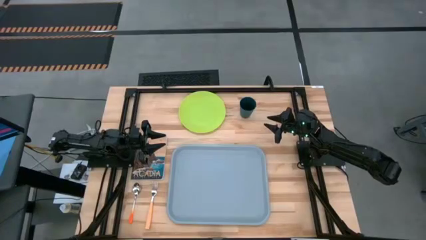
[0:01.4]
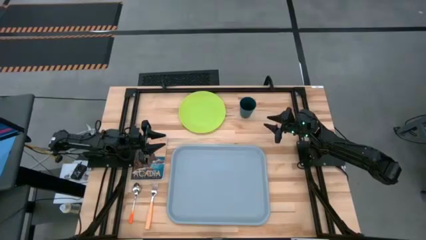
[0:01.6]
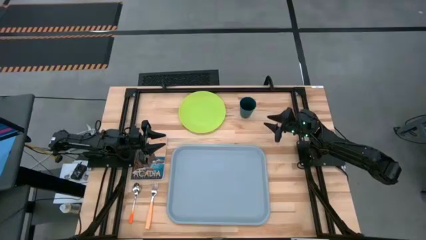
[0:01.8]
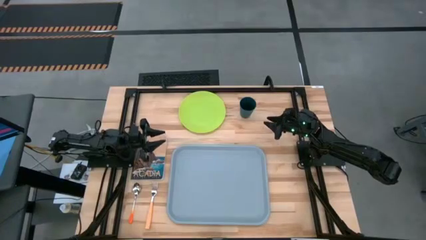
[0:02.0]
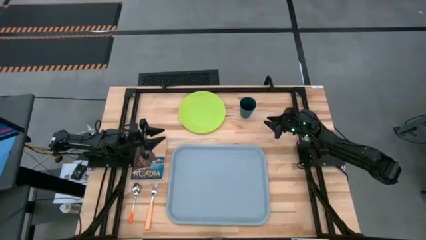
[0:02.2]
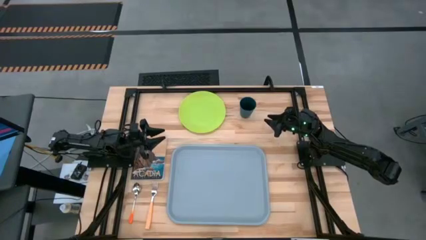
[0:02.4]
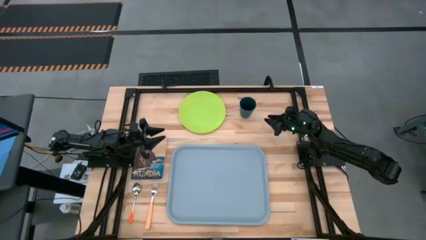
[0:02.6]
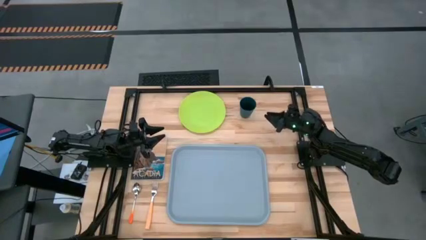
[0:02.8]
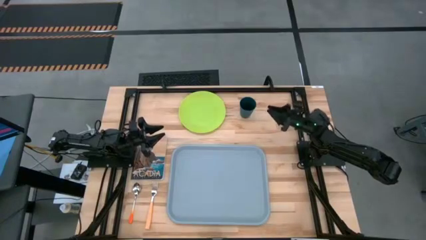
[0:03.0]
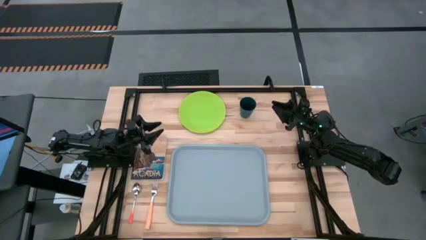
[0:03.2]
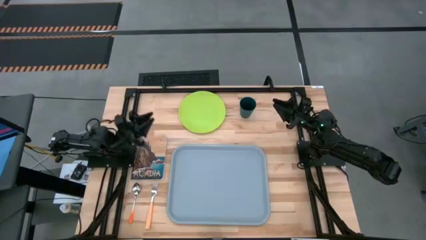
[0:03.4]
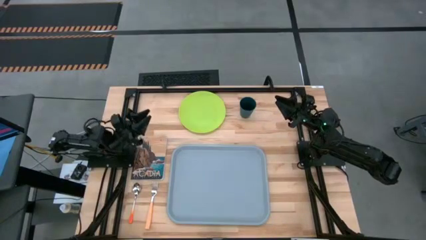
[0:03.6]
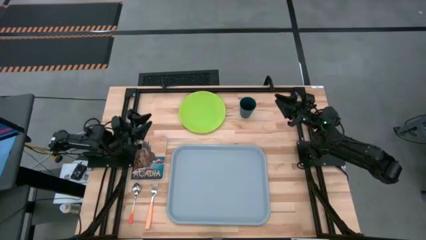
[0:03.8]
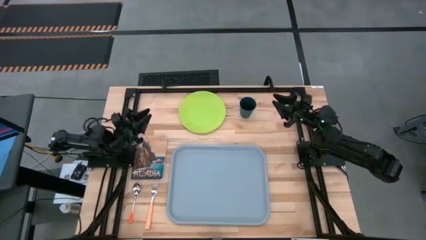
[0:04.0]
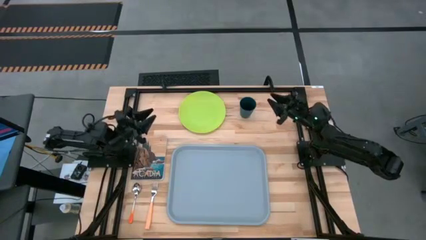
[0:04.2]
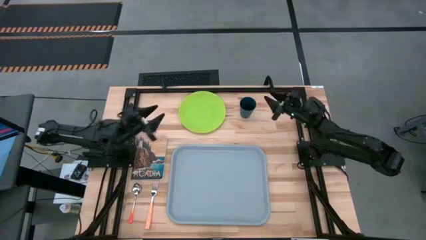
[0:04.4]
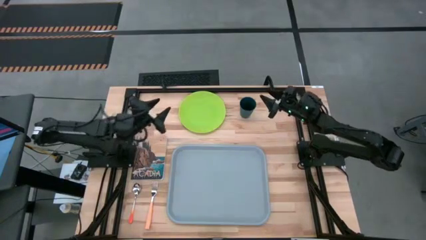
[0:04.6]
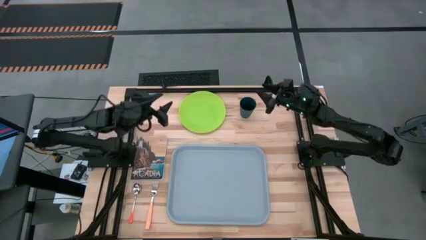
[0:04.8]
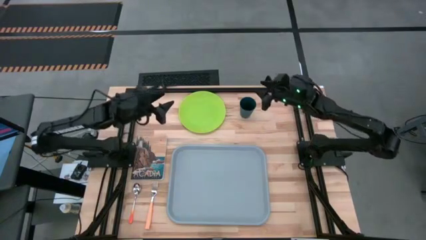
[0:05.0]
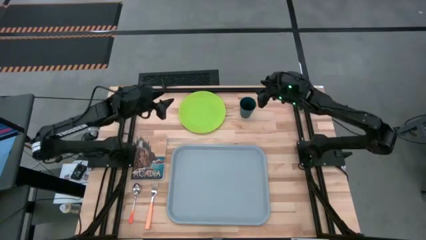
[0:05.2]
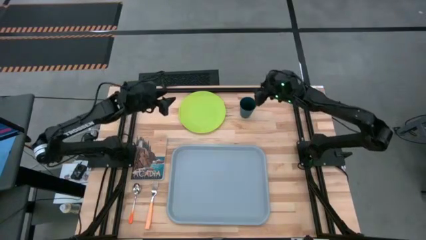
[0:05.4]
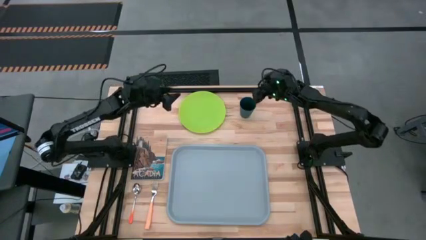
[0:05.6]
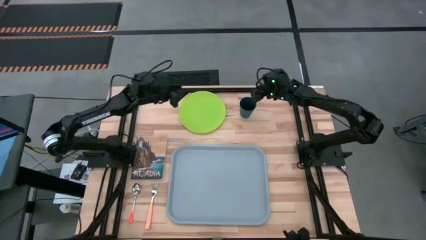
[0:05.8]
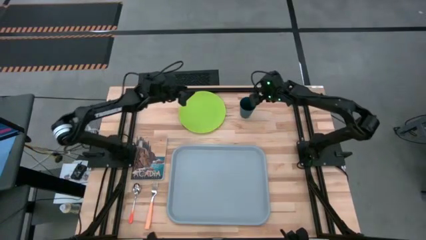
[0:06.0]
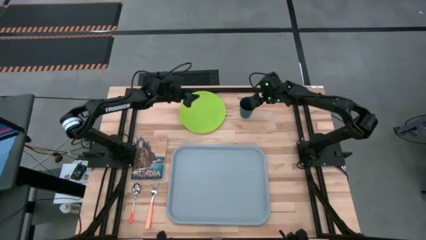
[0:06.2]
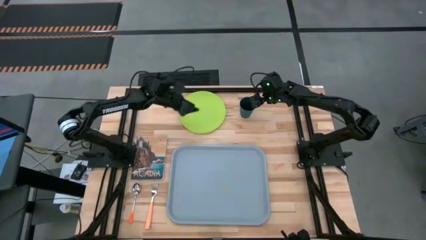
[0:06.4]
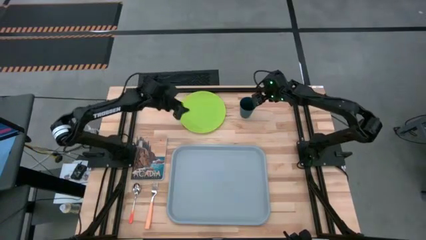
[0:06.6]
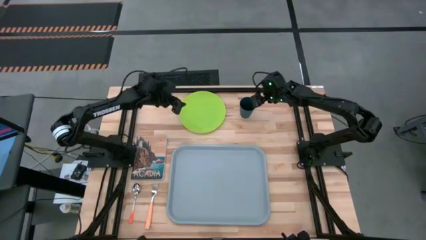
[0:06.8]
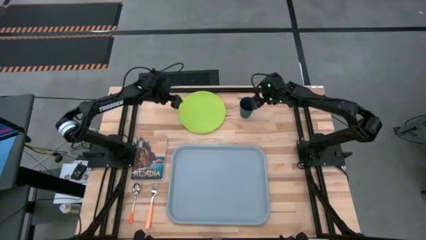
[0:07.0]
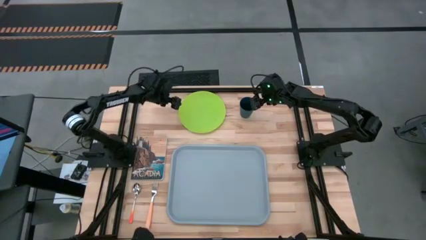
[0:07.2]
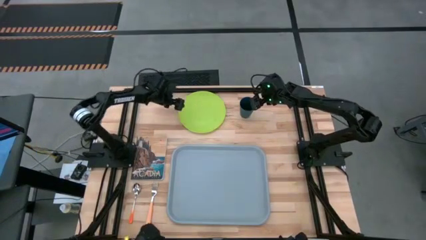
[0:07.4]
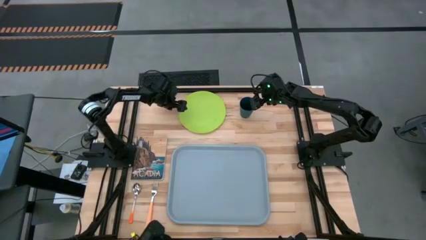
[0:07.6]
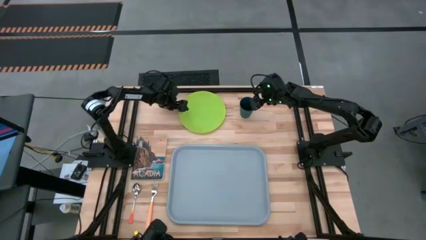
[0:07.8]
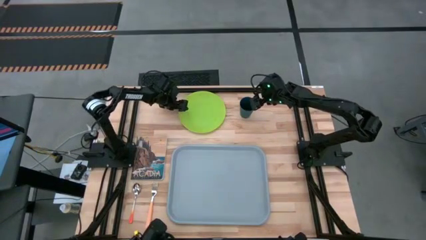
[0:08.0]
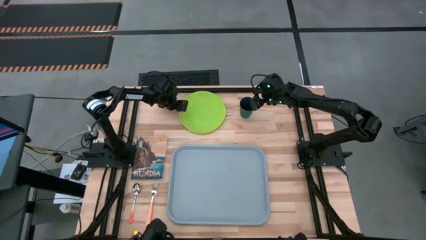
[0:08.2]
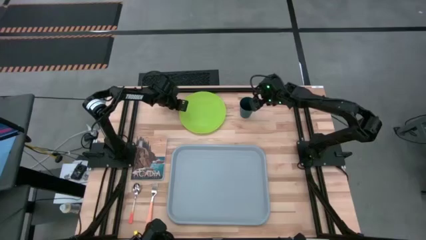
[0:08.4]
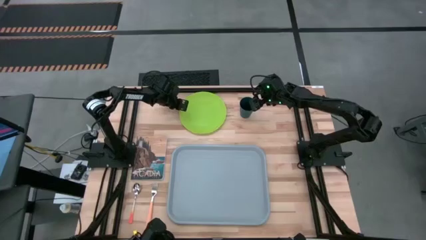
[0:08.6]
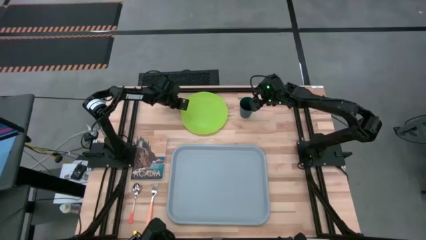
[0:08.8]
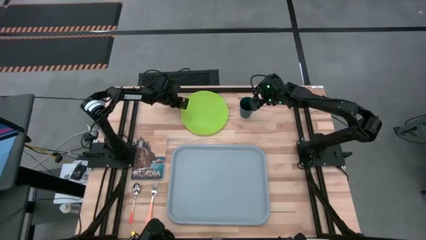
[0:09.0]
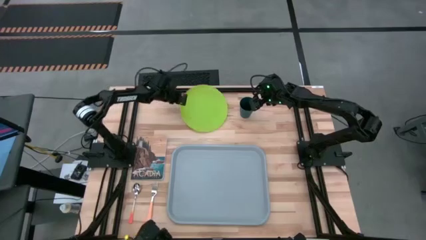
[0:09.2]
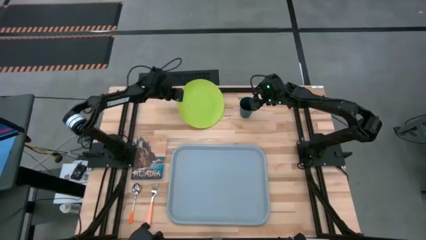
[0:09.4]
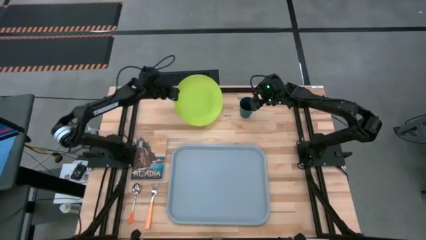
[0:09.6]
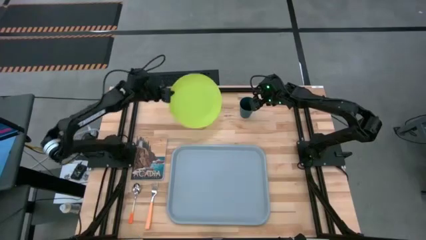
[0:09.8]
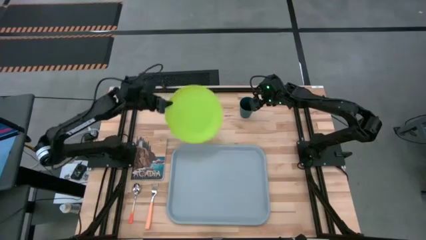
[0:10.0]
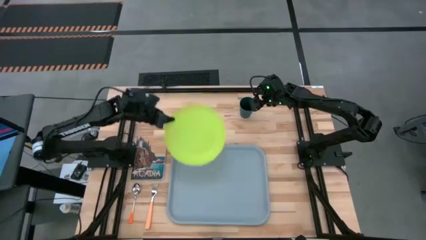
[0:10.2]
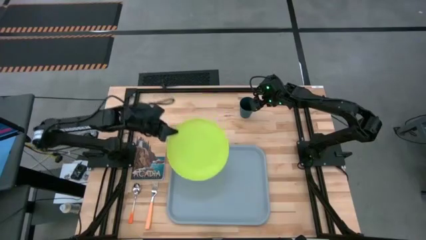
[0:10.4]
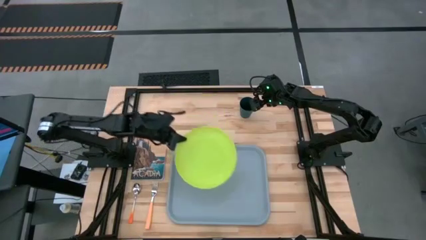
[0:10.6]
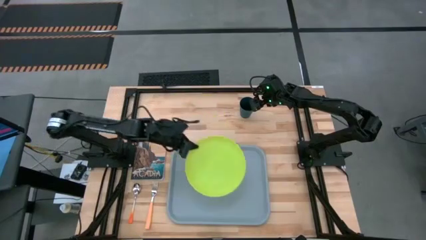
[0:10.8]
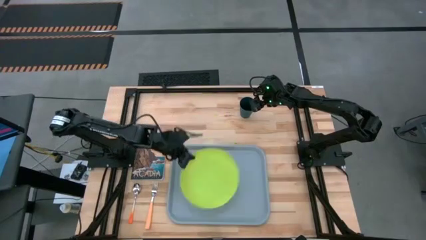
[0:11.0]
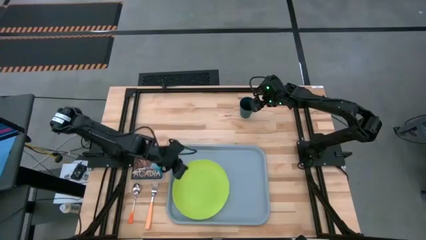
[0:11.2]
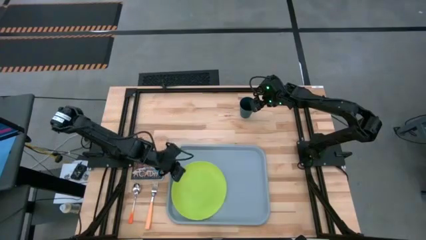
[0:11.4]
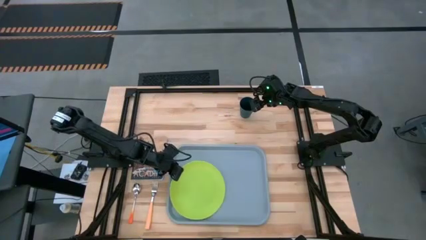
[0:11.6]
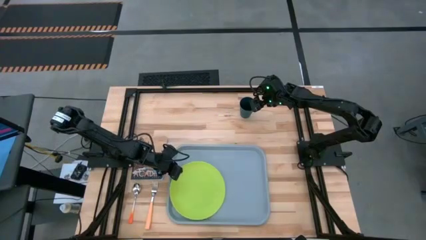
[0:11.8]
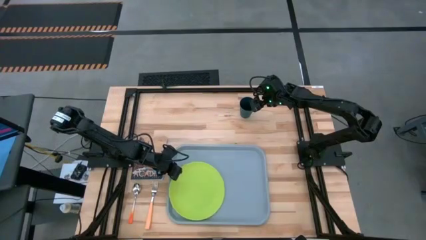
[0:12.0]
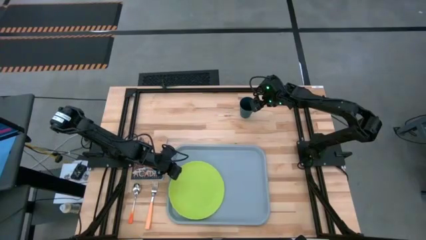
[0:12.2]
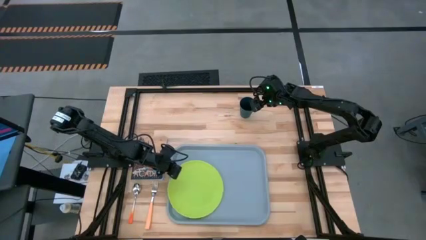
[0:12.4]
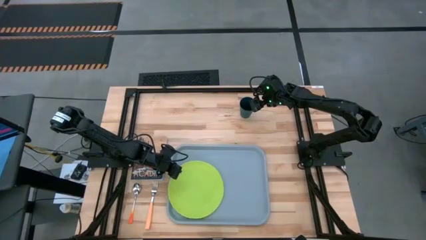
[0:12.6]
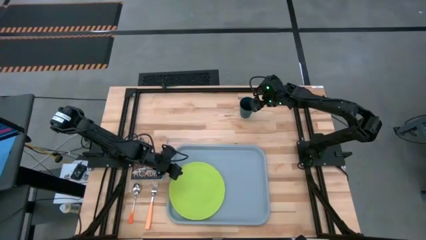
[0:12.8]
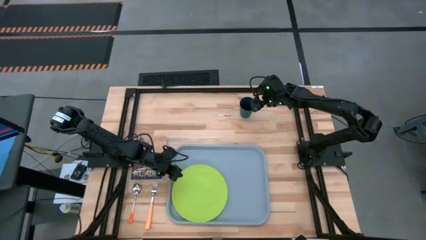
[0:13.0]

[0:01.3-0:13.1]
Task: Pick and place plate/cup/fork/spoon on tray
Put the green plate on the bottom left of the gray serving tray

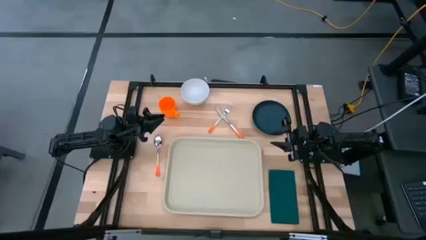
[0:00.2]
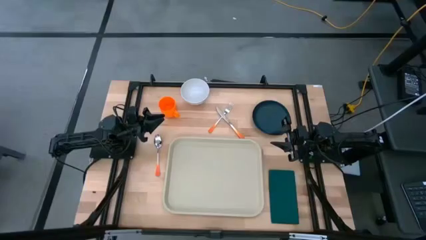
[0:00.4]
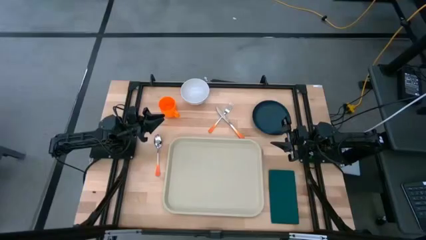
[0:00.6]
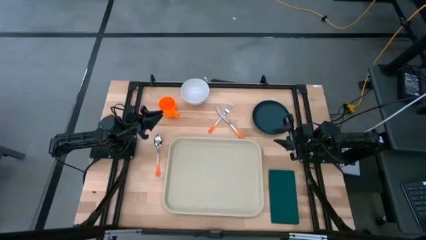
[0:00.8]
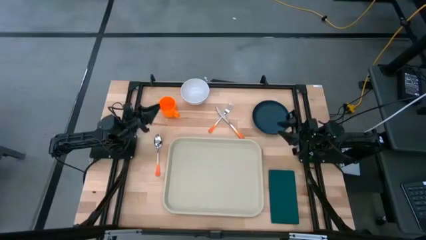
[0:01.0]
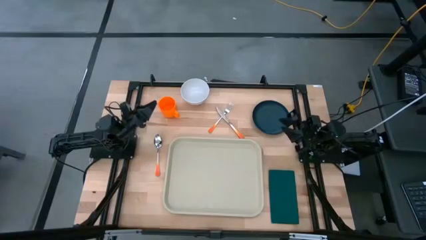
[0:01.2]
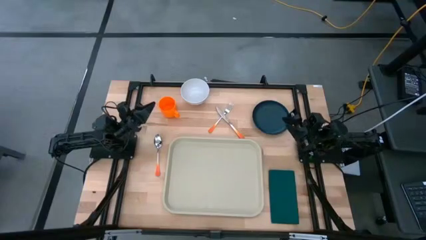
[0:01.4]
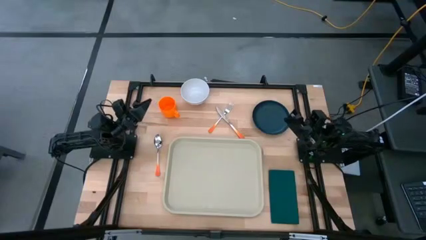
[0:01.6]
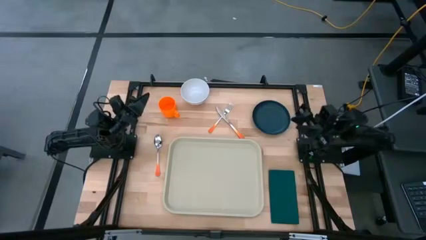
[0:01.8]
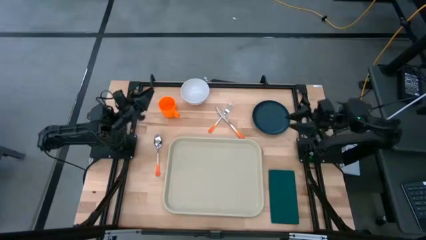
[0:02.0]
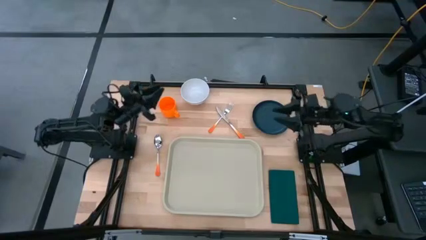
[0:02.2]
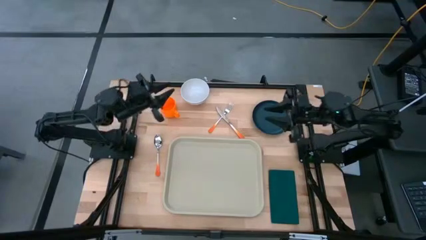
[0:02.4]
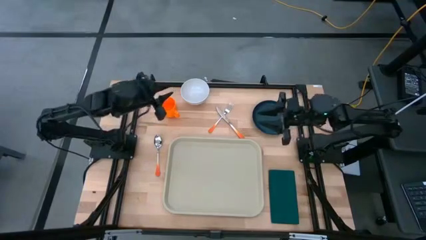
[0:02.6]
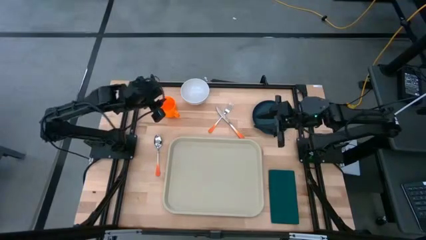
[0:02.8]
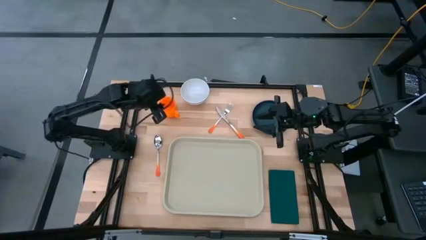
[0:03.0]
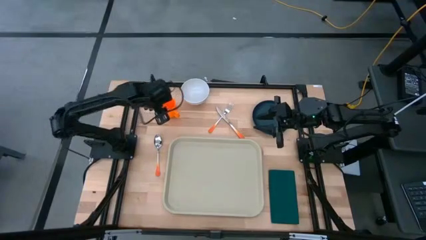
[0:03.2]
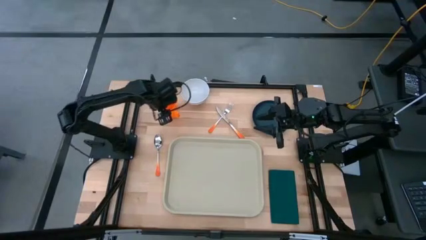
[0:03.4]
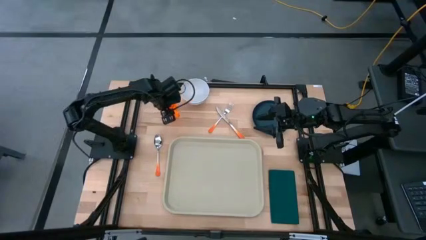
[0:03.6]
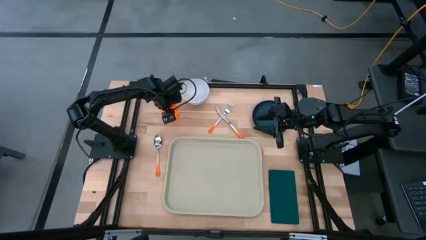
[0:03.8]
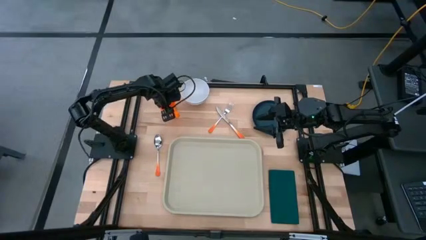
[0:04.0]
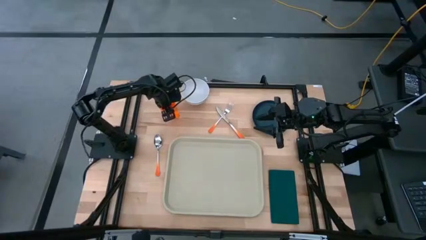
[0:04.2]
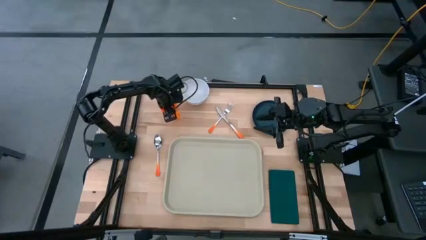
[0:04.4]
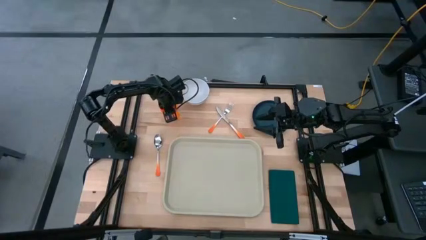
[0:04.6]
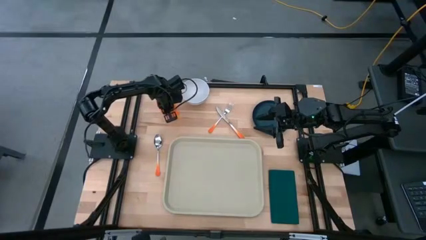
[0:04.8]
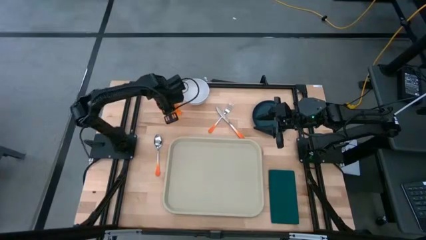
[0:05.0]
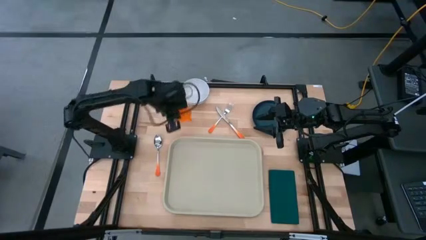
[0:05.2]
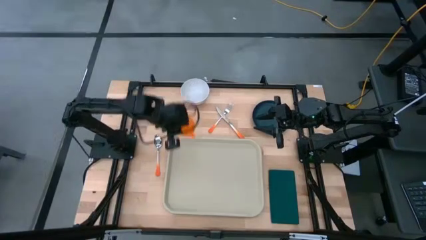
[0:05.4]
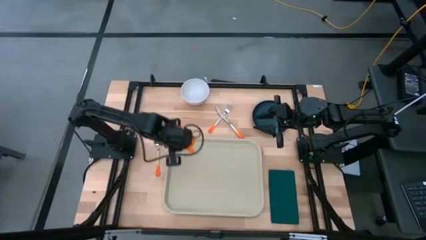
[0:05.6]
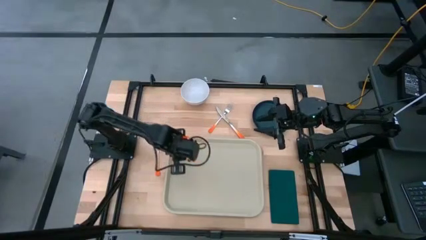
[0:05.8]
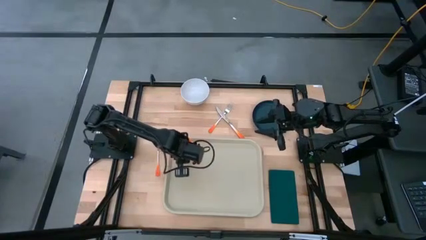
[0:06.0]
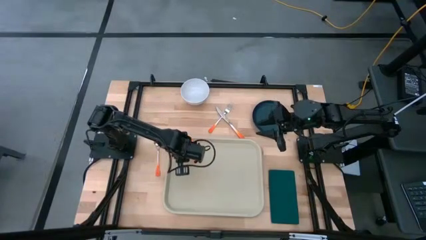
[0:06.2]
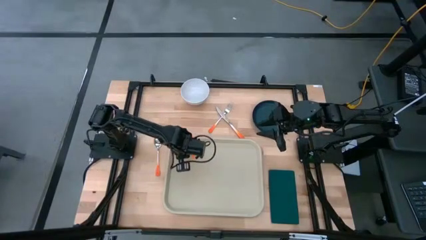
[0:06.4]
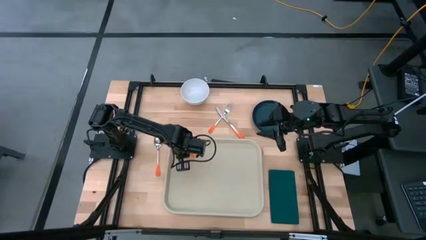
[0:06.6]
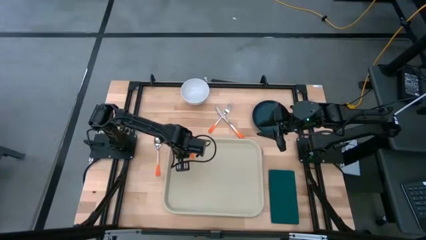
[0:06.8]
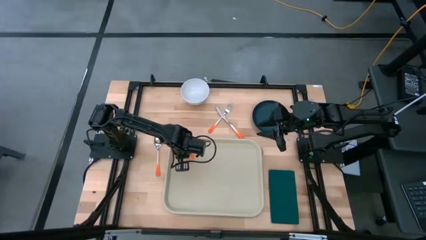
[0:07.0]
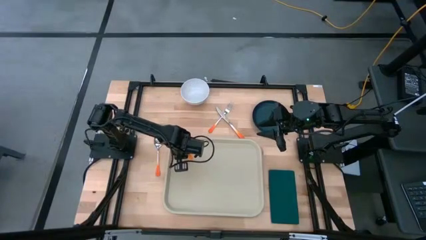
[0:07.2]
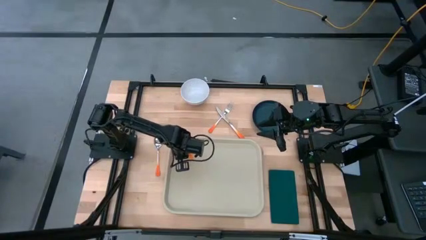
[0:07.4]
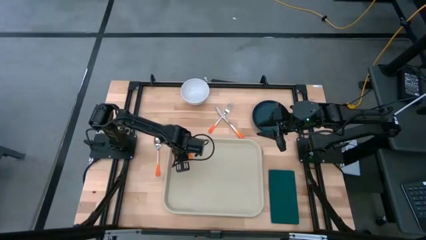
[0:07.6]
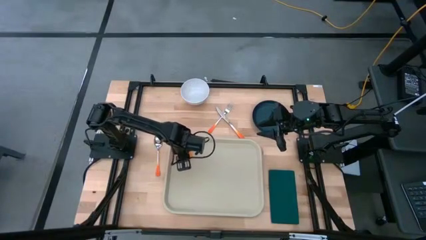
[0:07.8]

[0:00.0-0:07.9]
Task: Set up tray
Put the orange mug on the brown tray
